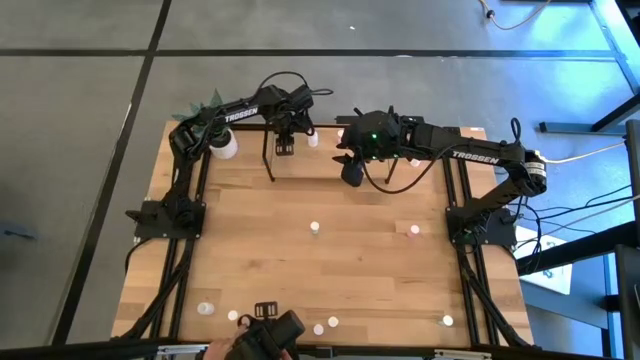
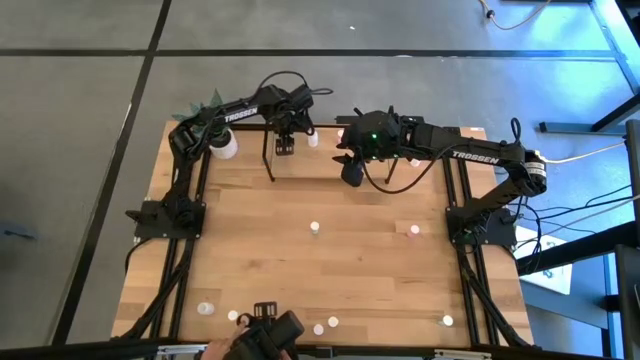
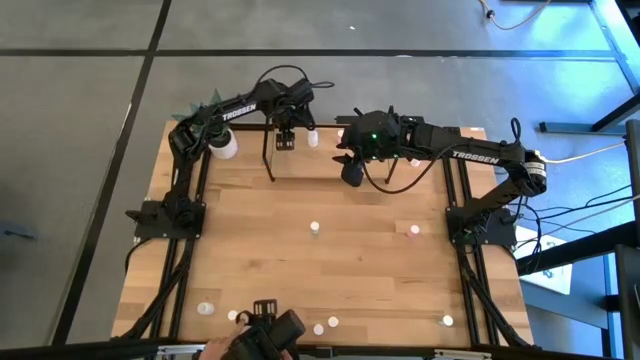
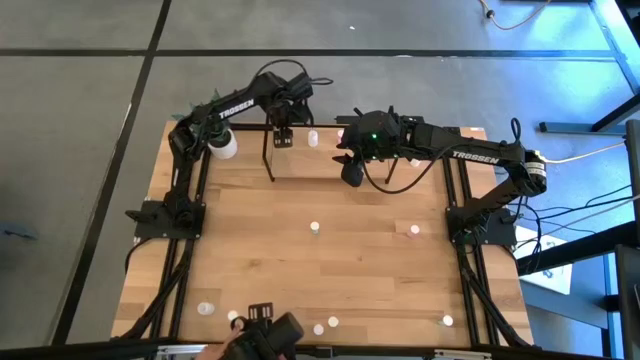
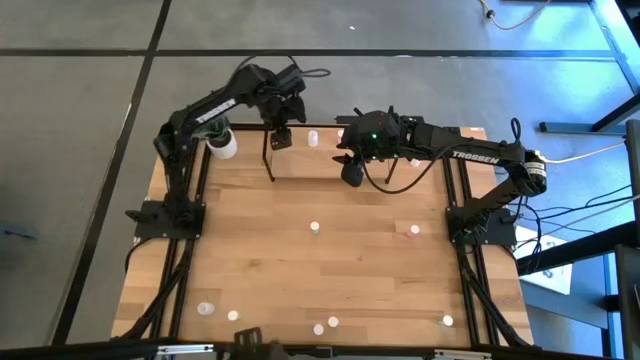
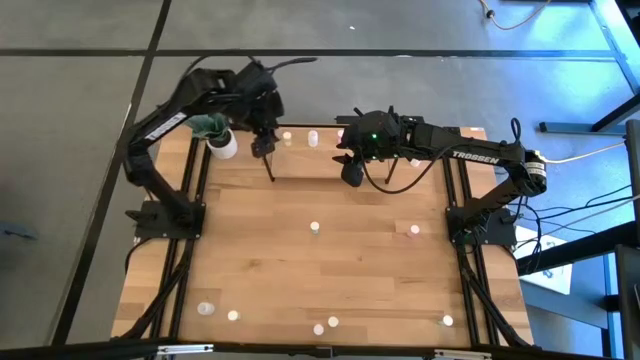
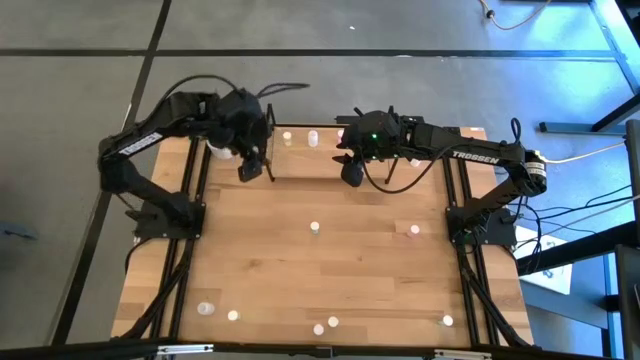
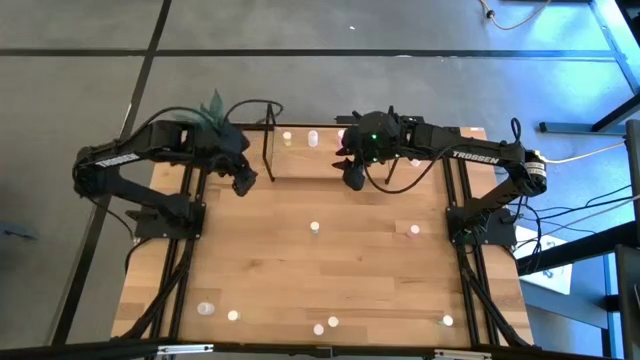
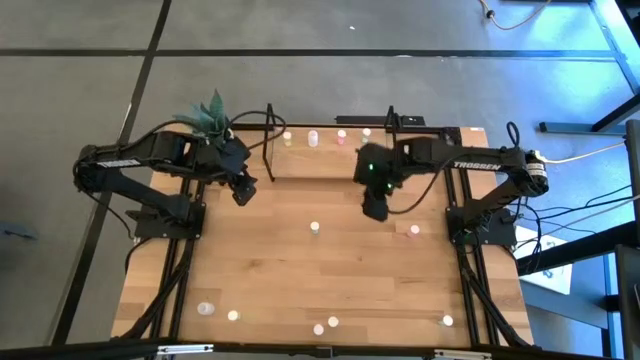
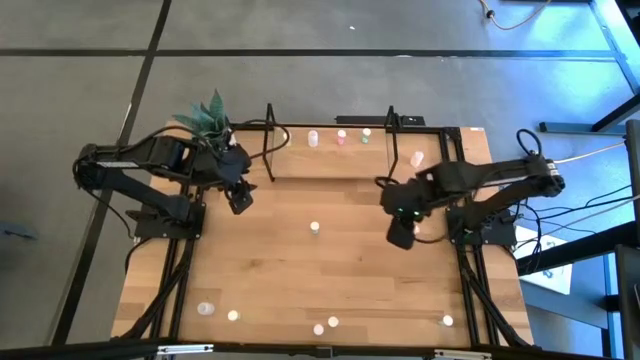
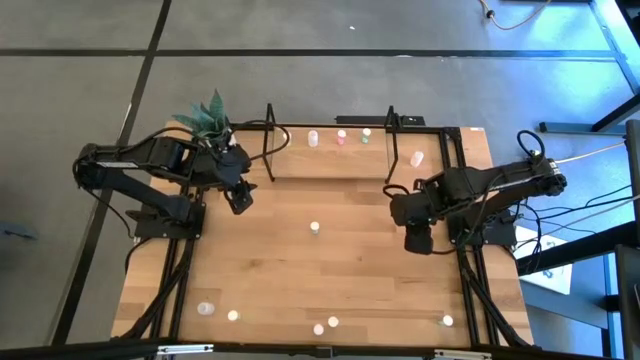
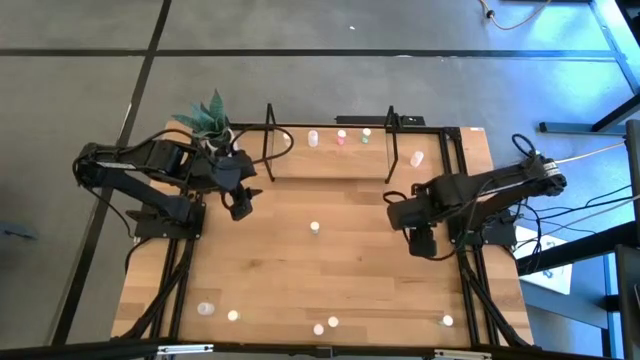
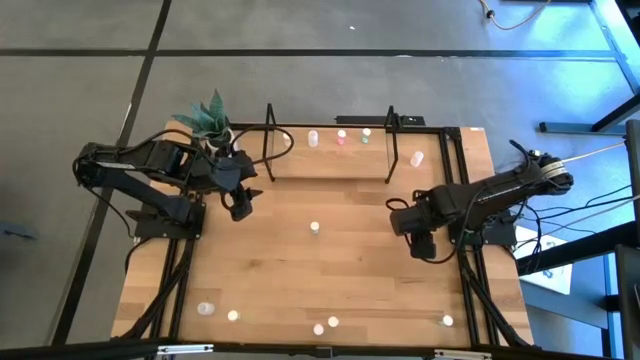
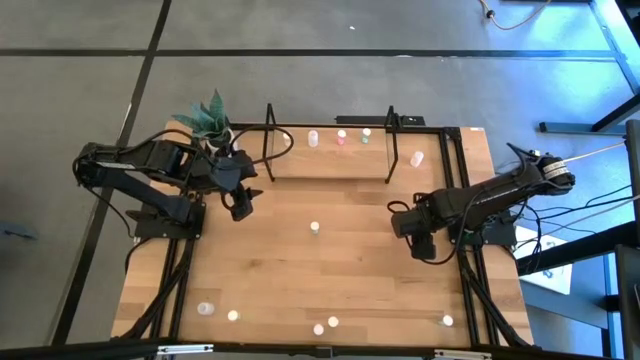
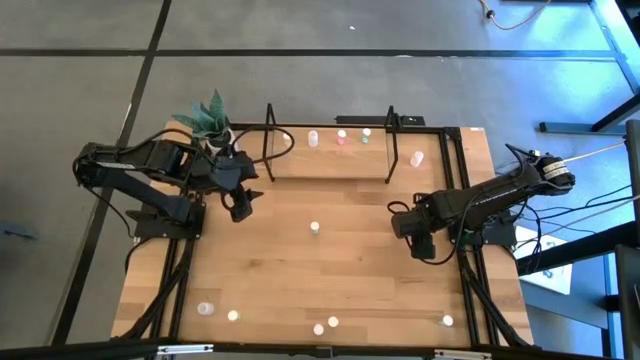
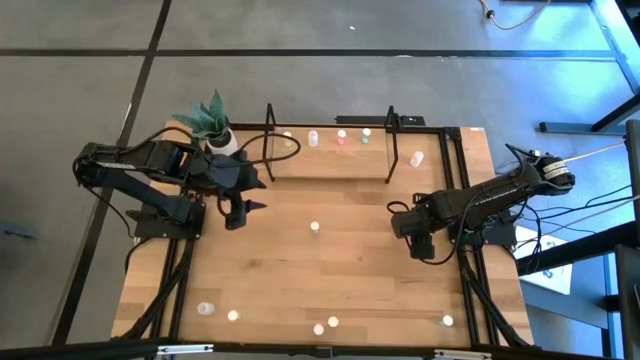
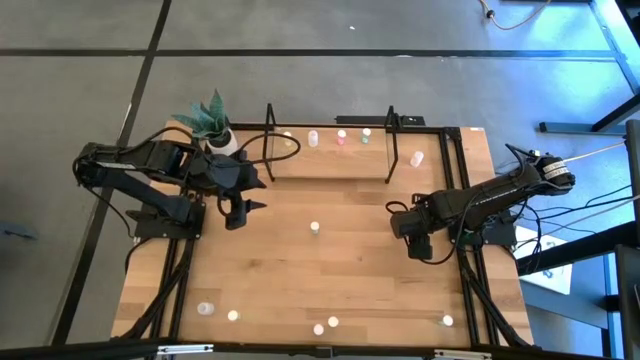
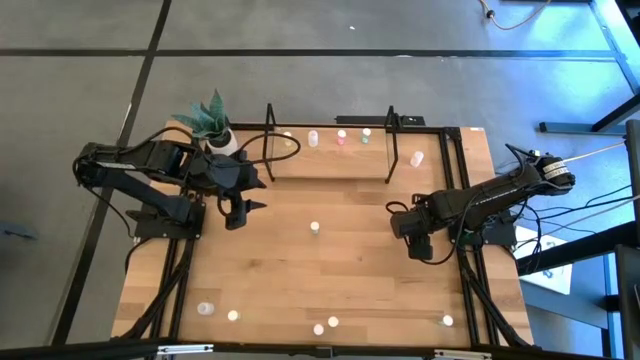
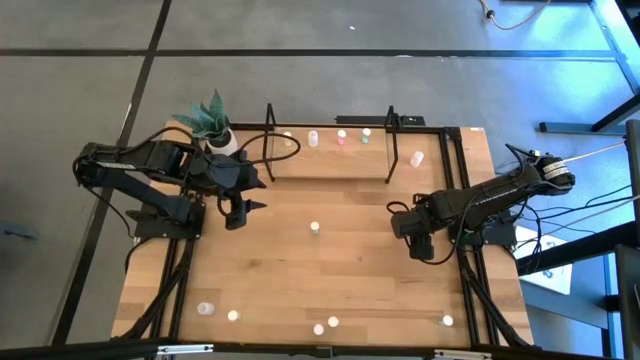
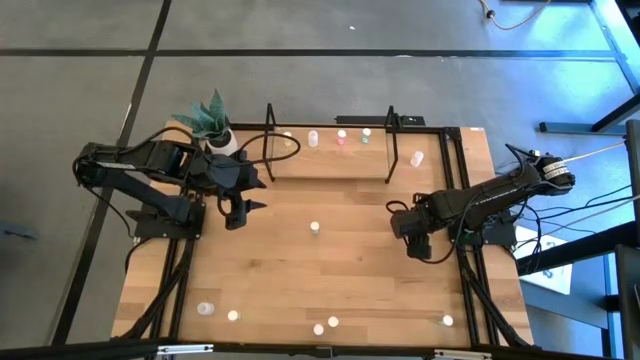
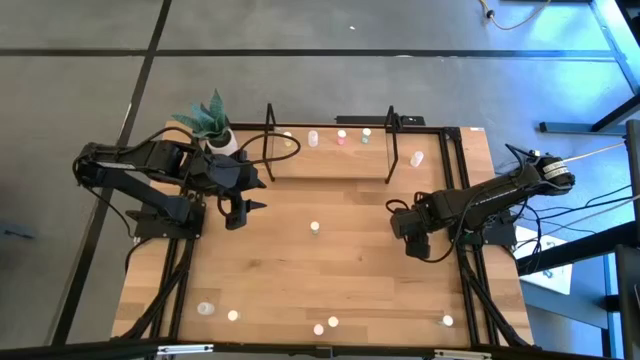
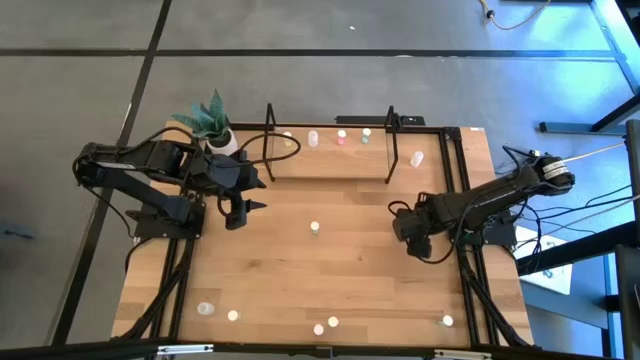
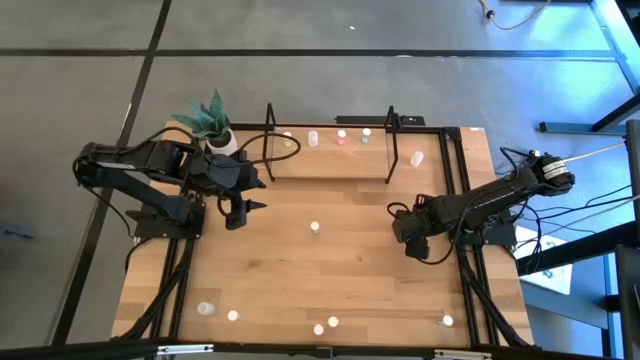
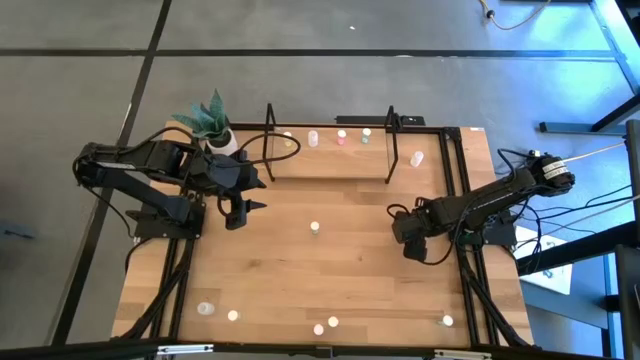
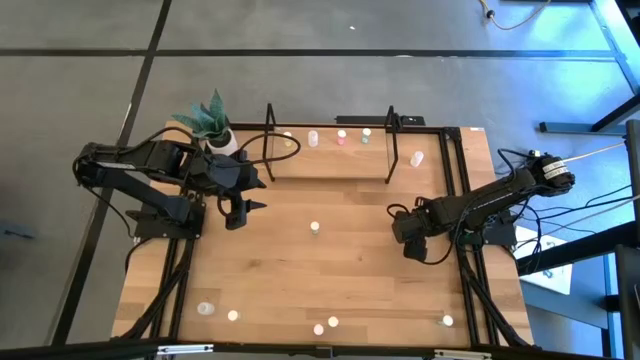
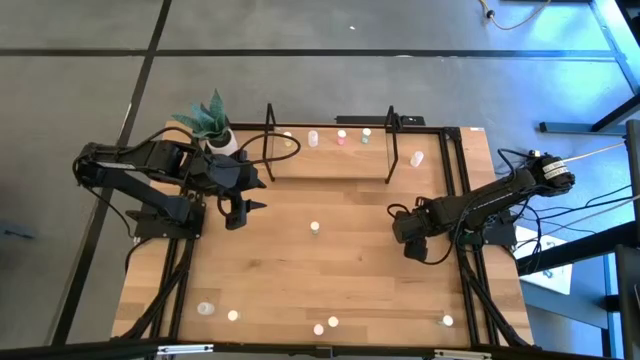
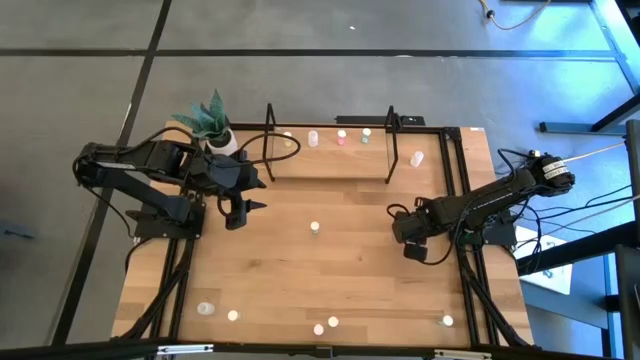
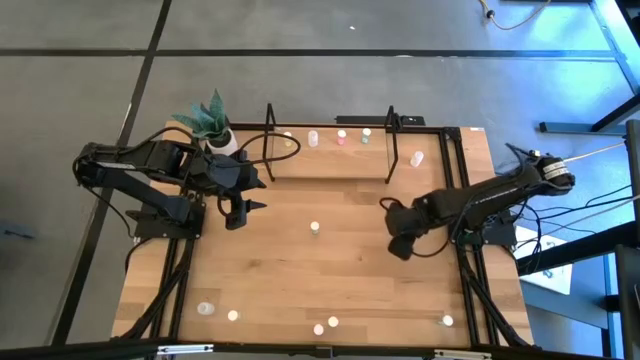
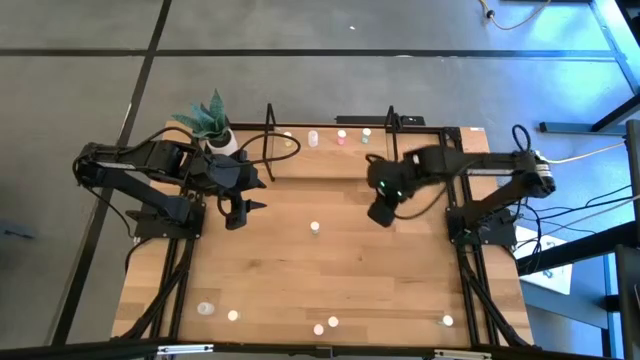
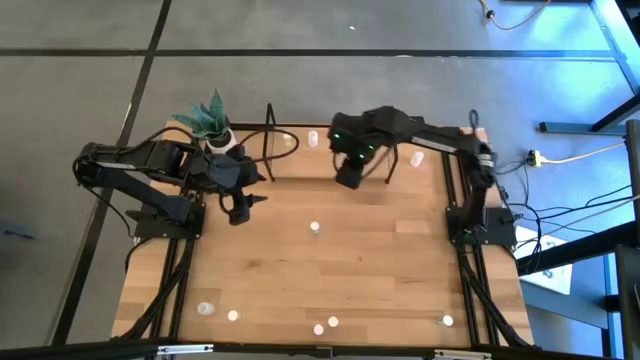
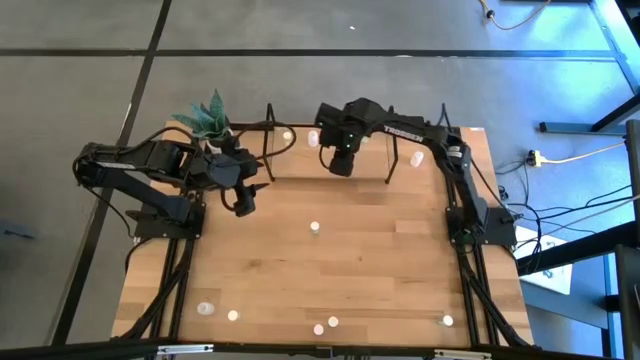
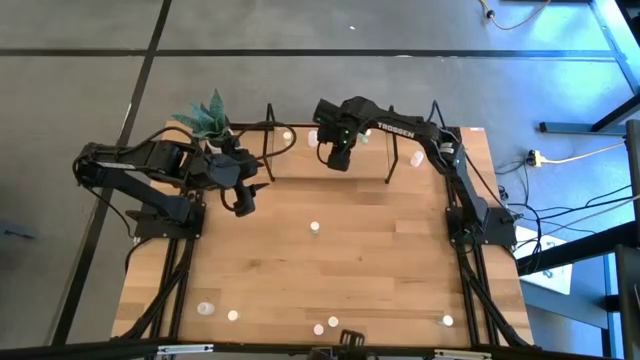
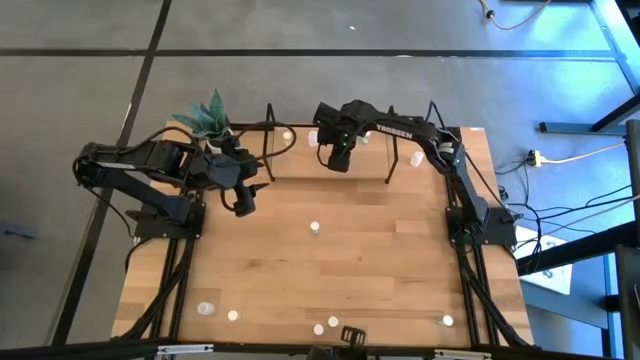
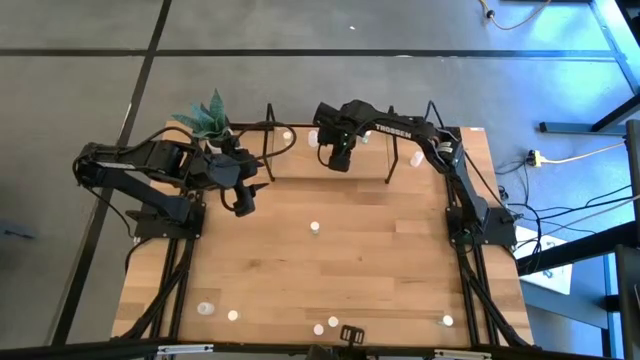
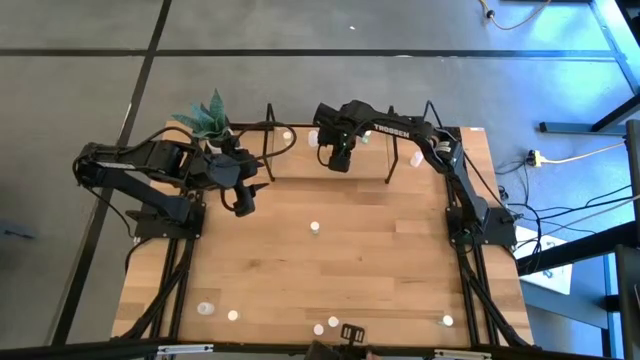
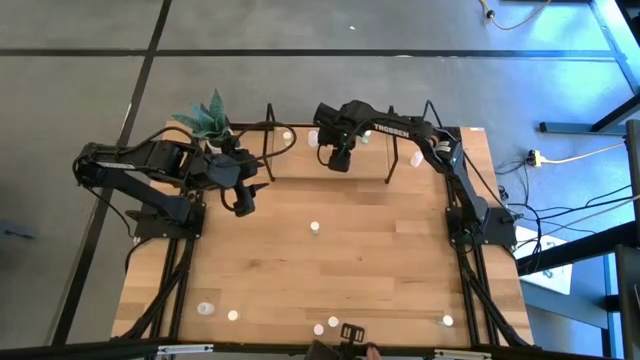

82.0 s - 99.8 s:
Task: Pick and place medicine bottles onto shelf by color
Put the top pink pill bottle on the shelf aligned with the other pink pill bottle

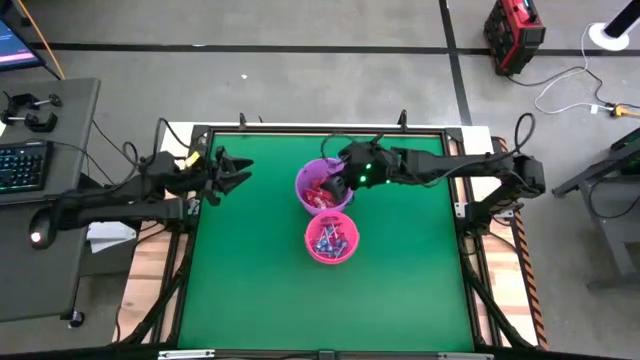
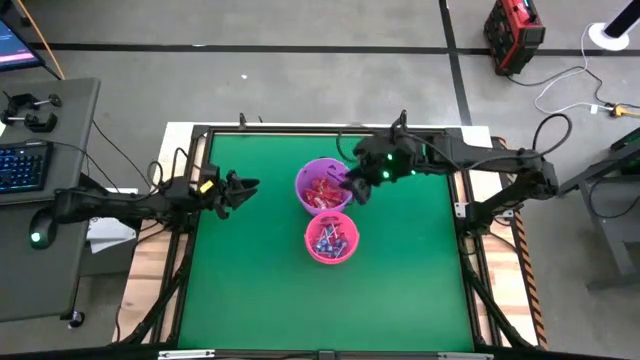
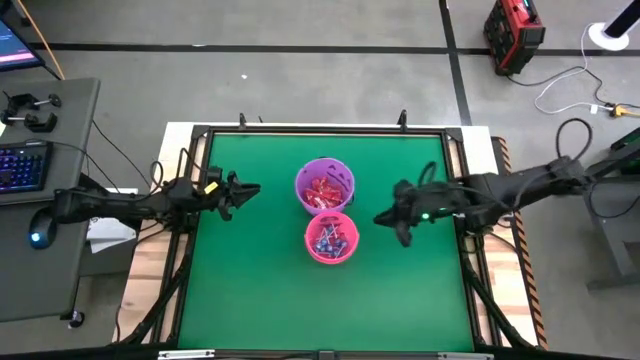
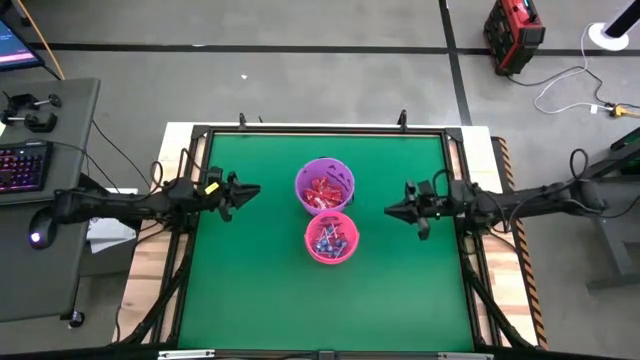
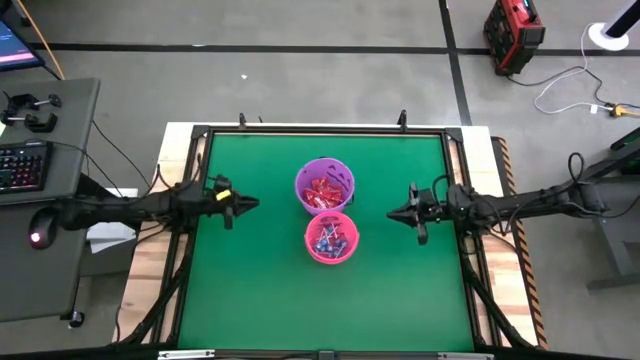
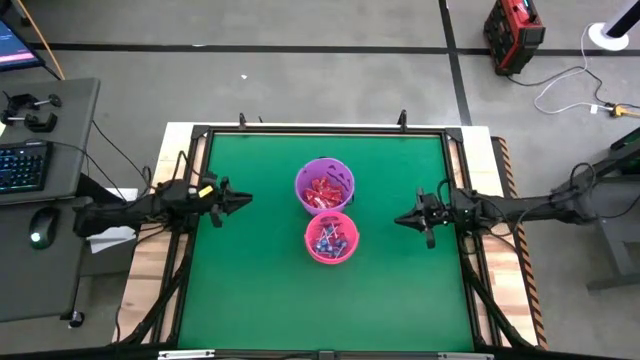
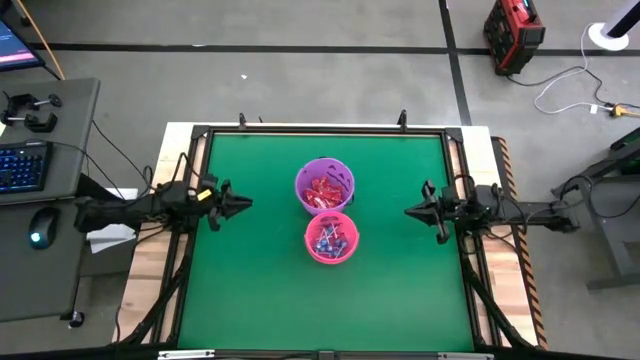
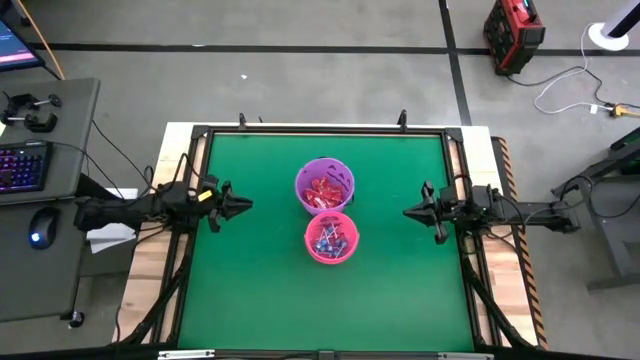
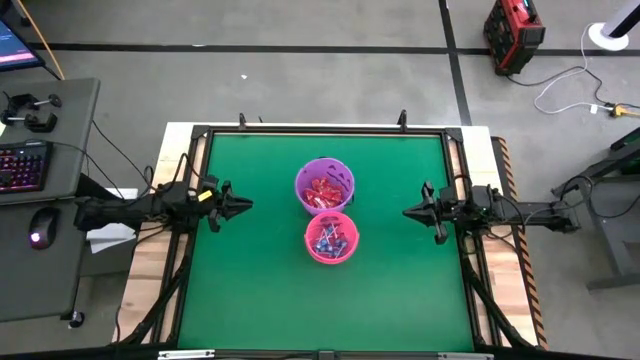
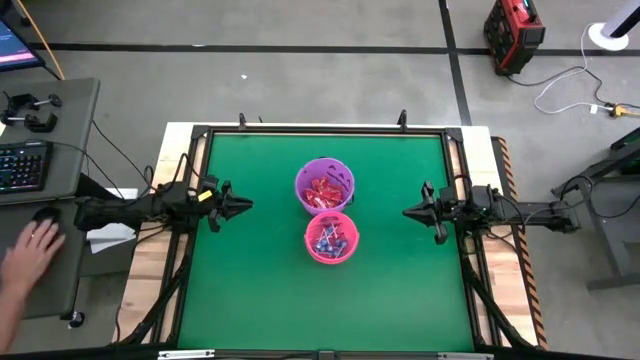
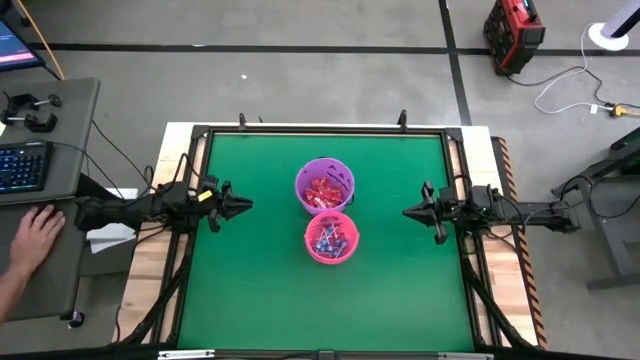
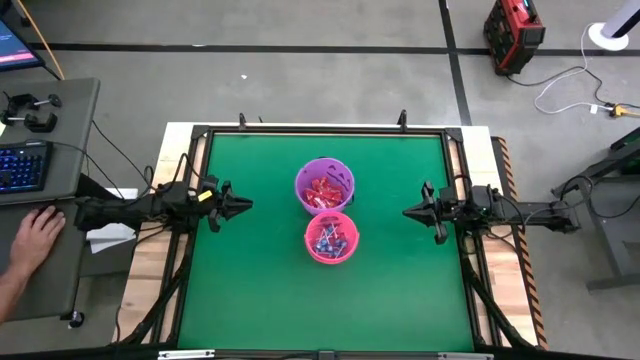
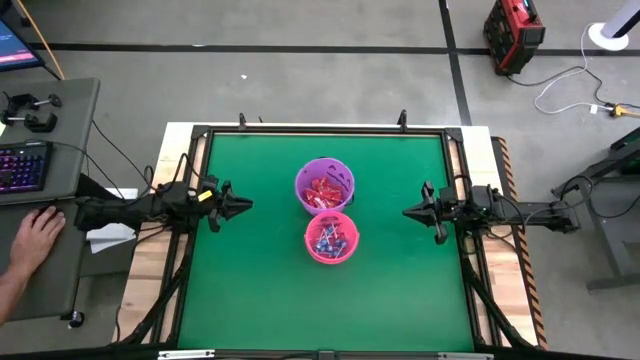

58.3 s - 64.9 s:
Task: Sort candy by brand, put in halloween buckets
Return to Home Position
